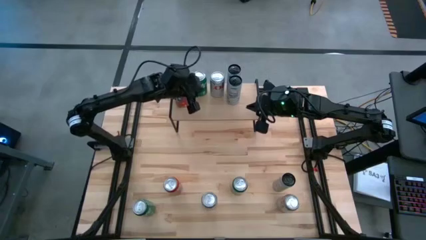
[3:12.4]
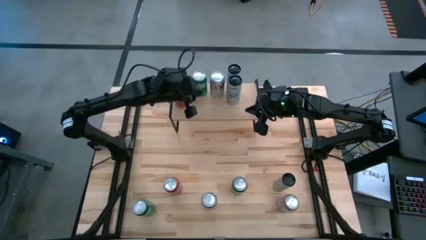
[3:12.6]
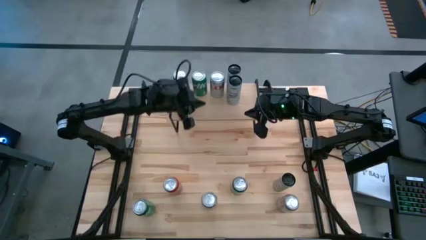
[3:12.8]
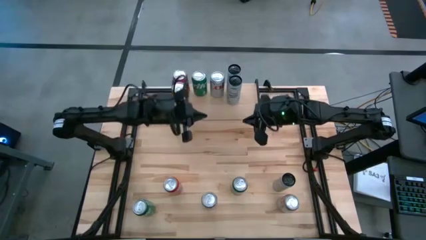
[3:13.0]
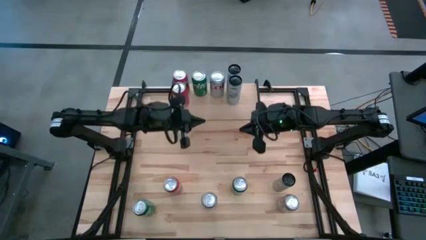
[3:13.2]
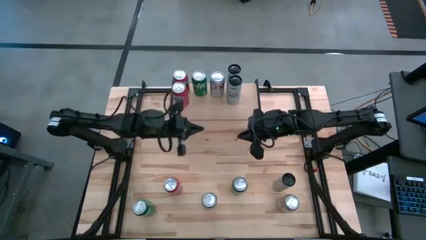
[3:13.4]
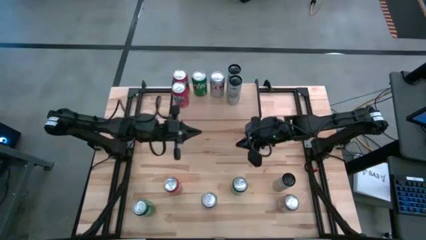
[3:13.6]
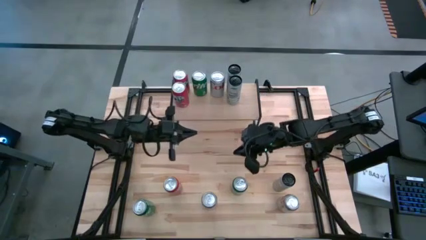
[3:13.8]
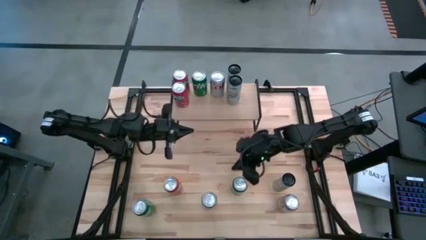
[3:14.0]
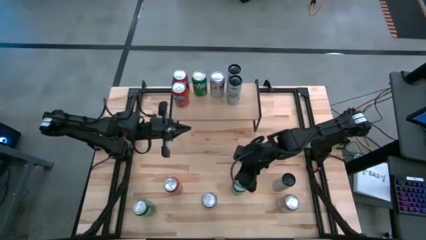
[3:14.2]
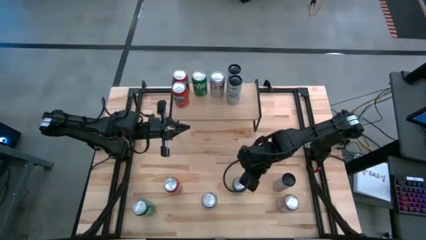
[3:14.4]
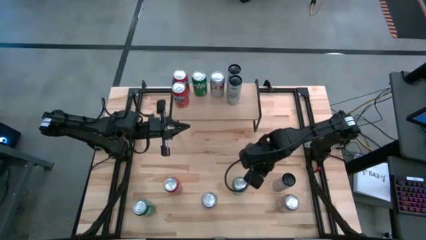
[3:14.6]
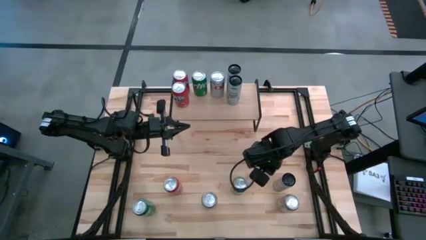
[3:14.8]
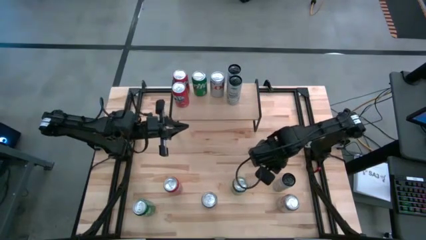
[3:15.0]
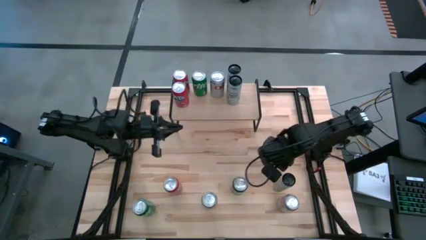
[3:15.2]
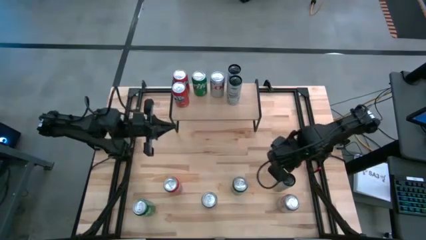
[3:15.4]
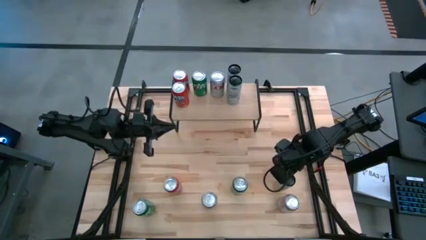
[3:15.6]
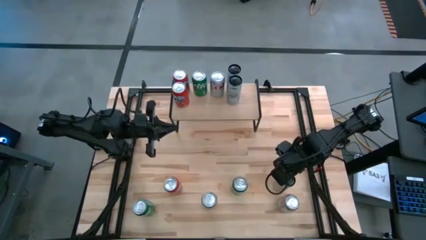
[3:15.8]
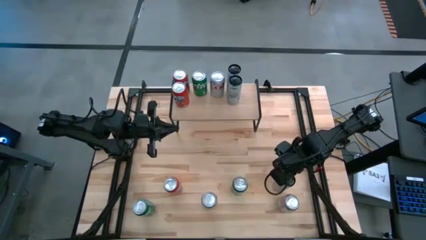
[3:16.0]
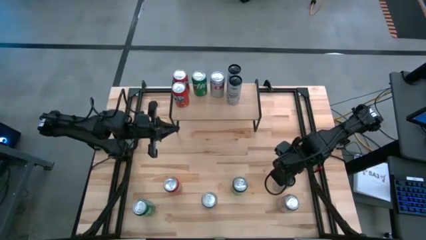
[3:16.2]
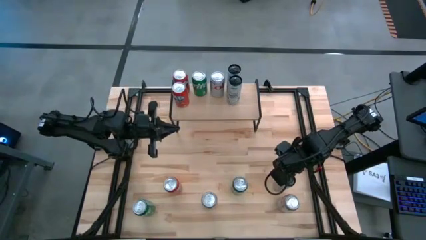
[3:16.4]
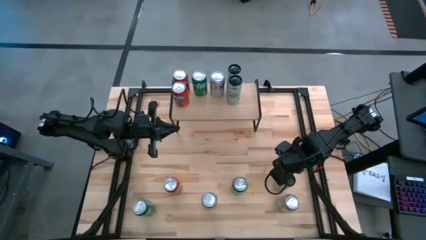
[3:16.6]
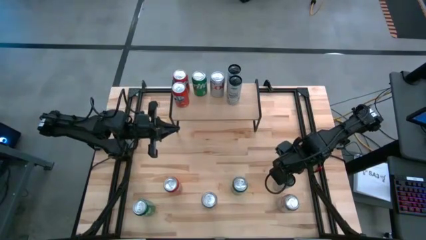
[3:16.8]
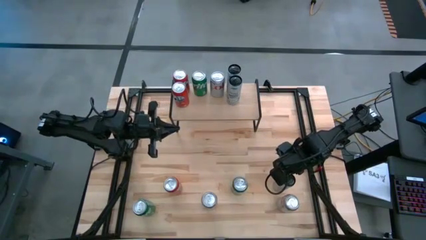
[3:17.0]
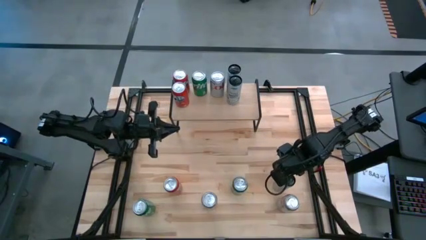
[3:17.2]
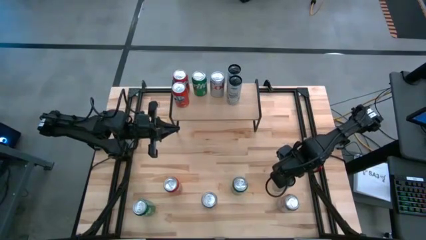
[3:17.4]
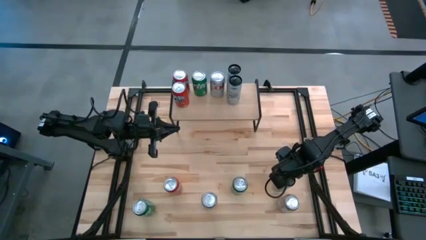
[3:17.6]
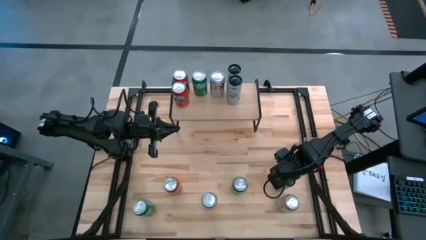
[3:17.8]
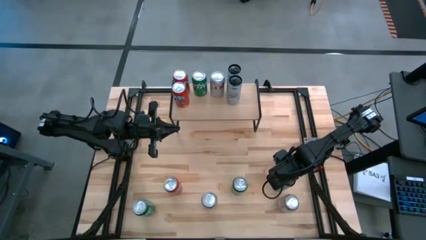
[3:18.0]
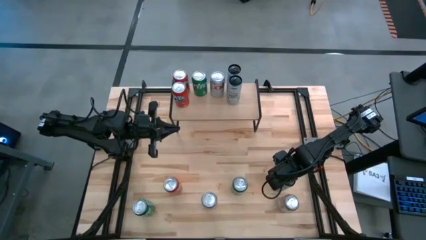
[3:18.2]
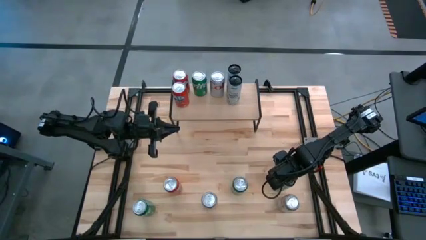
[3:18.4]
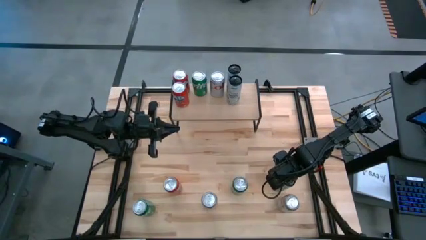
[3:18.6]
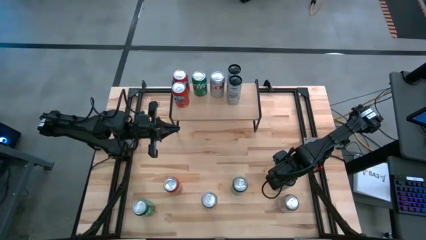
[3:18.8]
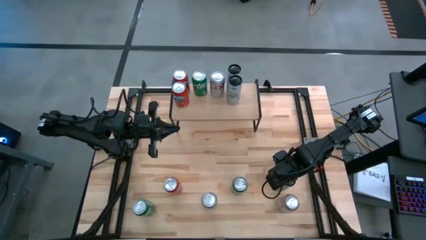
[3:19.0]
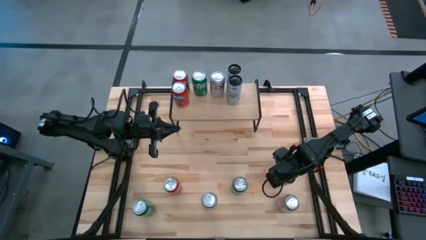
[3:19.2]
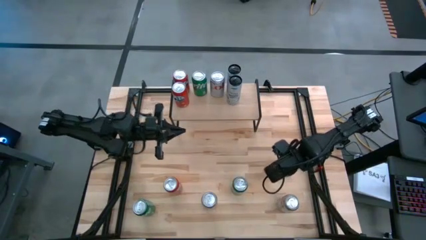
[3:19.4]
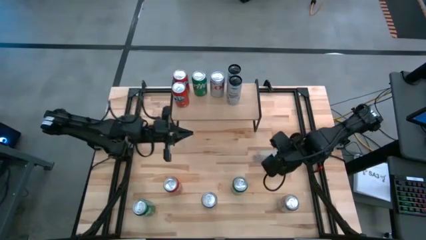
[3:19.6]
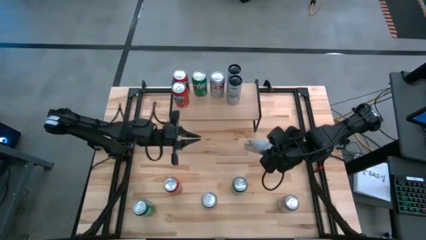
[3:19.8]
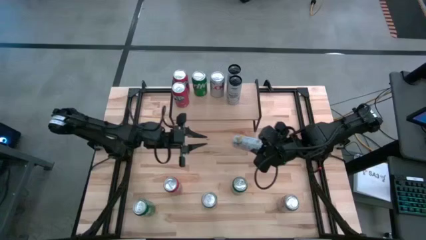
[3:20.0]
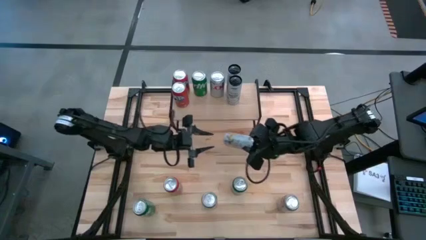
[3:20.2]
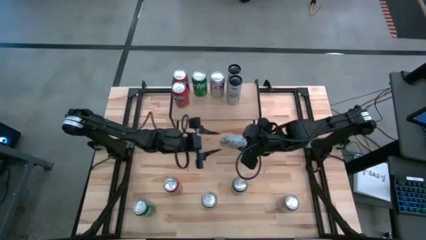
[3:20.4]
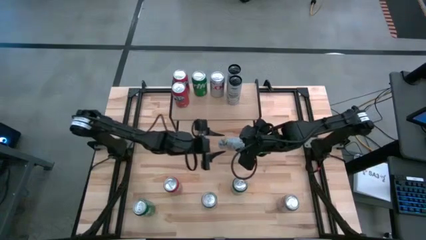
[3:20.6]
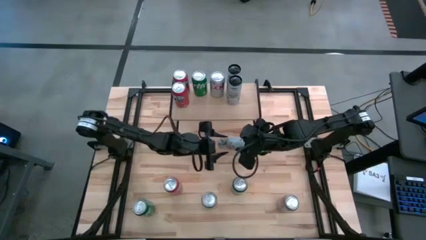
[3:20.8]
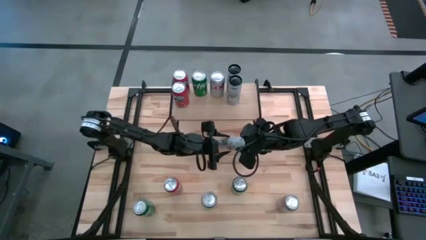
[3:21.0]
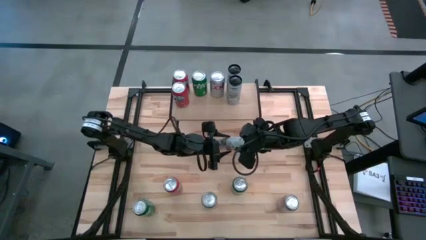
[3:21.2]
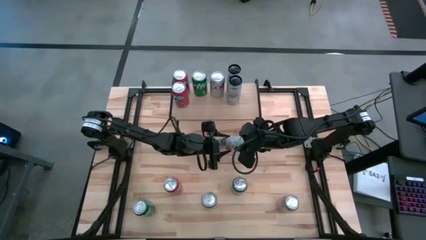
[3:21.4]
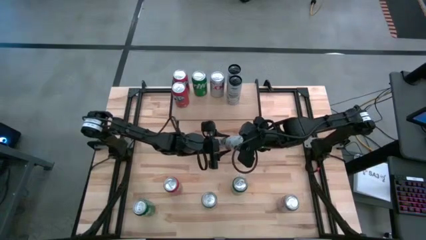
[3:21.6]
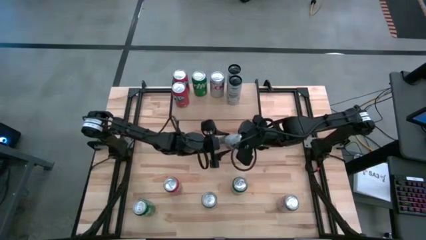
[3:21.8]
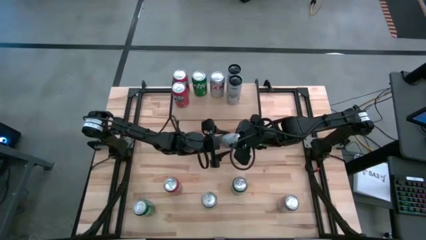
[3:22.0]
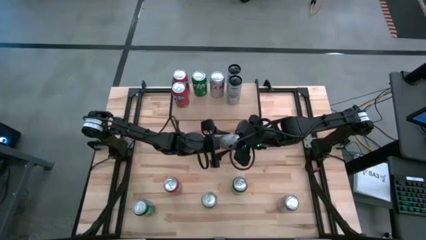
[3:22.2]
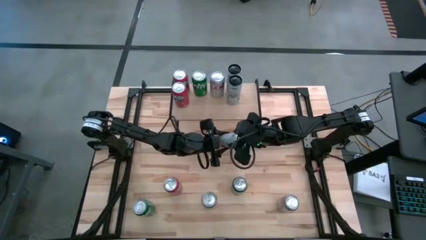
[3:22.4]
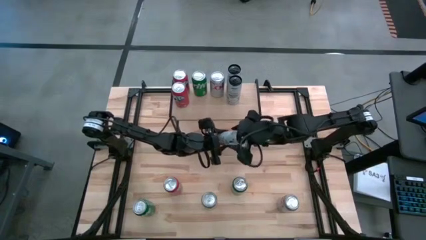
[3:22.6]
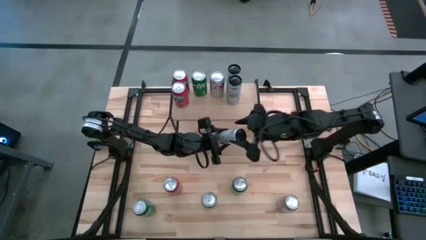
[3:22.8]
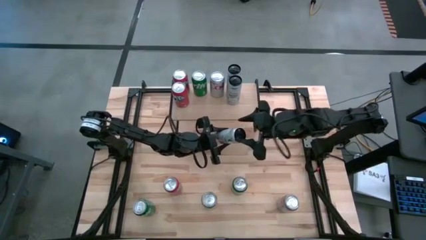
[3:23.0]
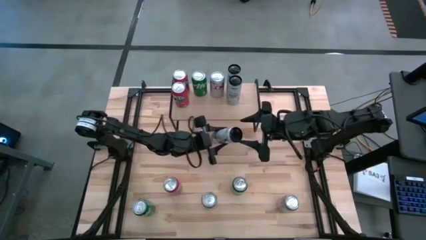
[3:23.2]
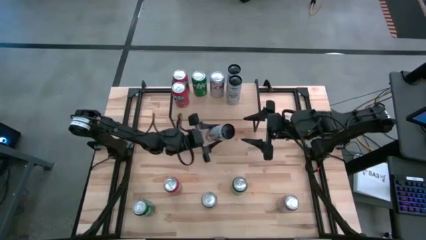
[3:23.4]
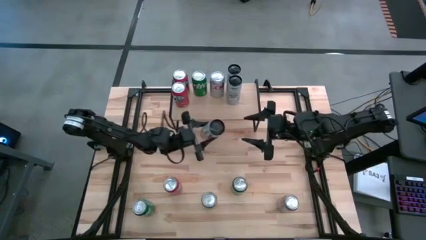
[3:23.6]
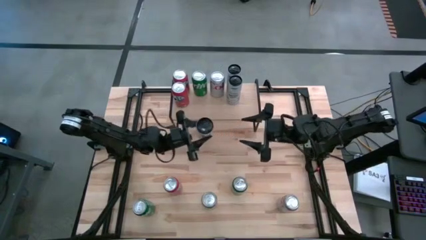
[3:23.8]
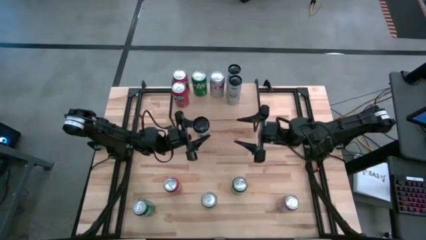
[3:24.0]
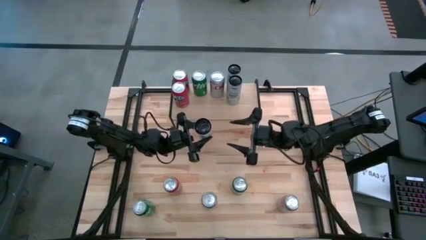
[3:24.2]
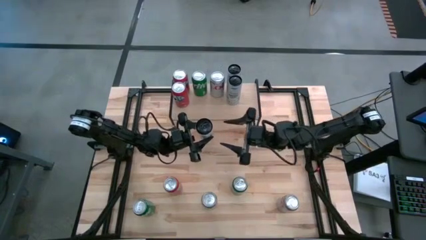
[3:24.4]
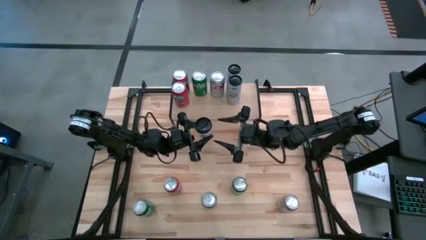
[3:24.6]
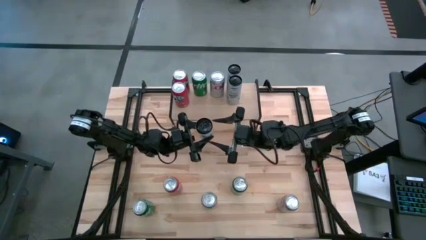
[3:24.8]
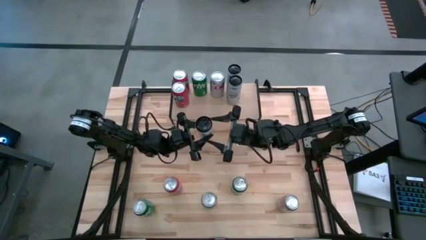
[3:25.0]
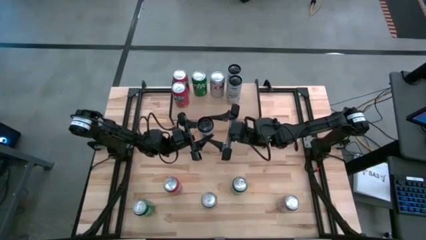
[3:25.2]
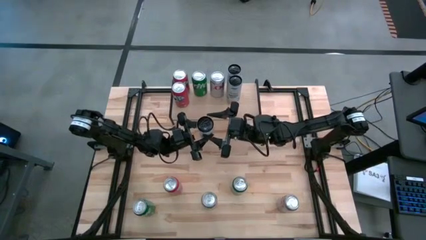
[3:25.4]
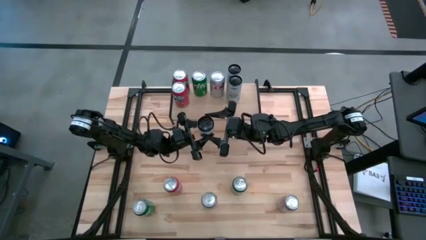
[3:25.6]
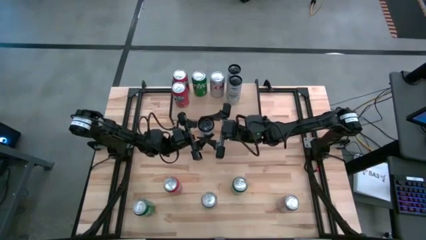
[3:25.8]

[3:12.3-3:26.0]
Task: Place canned beverage on shelf
Put the white-yellow soda can on the shelf

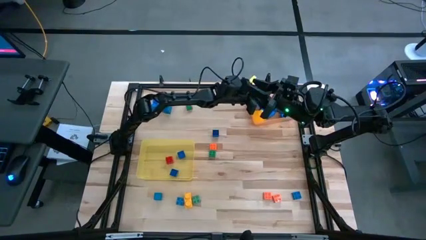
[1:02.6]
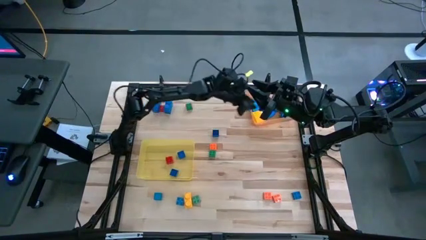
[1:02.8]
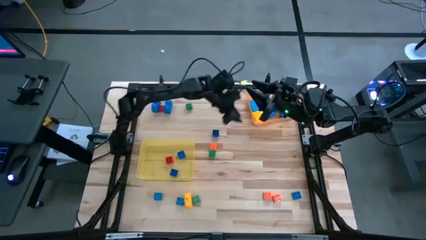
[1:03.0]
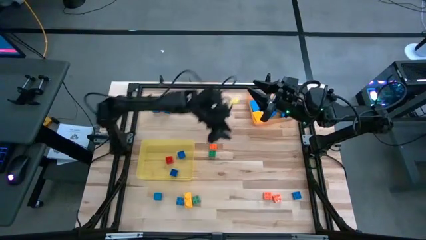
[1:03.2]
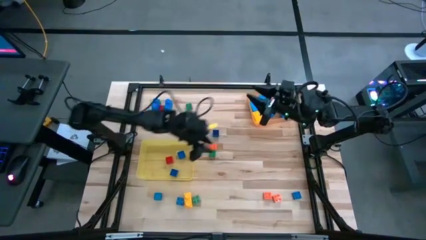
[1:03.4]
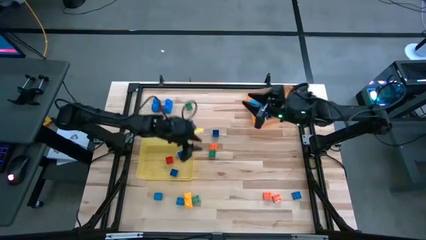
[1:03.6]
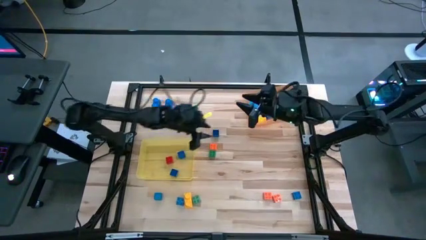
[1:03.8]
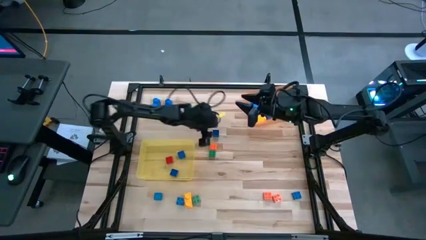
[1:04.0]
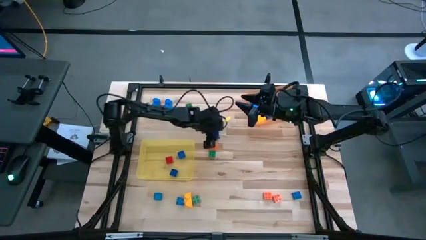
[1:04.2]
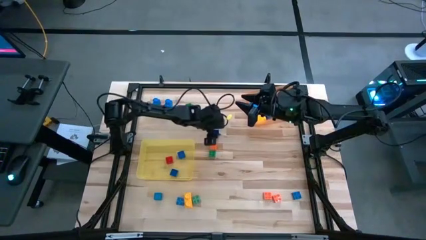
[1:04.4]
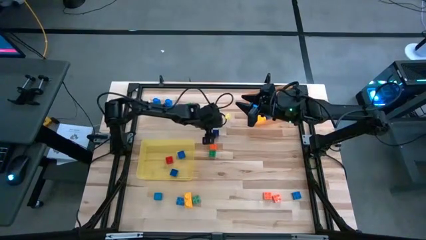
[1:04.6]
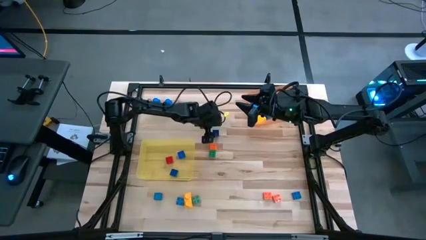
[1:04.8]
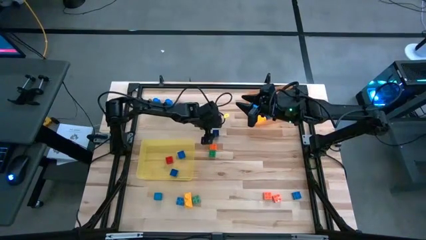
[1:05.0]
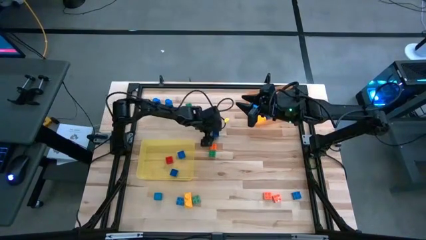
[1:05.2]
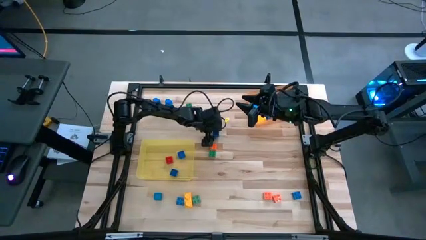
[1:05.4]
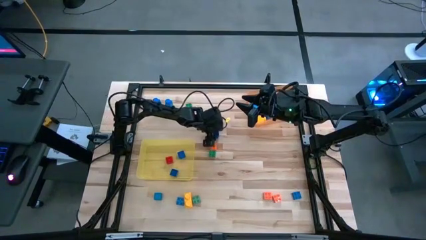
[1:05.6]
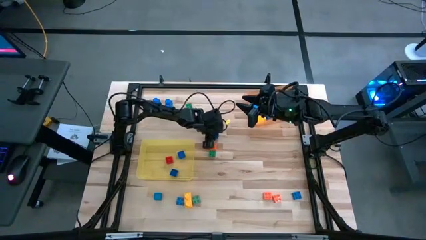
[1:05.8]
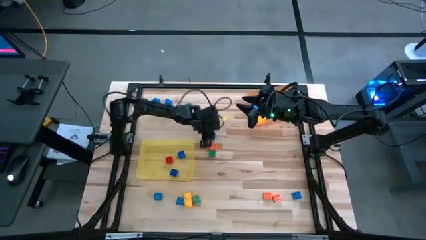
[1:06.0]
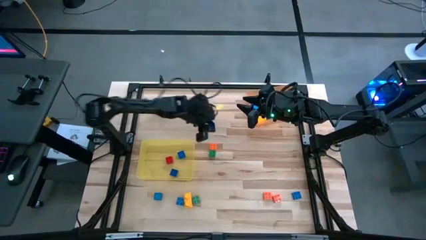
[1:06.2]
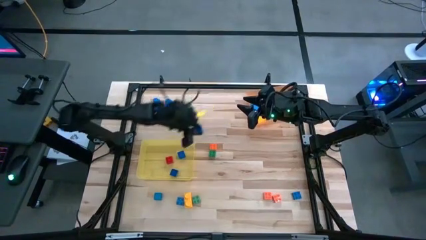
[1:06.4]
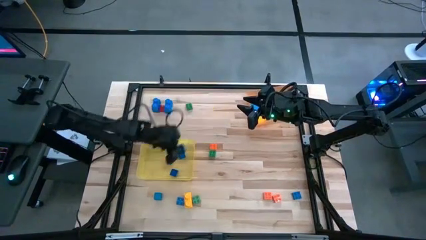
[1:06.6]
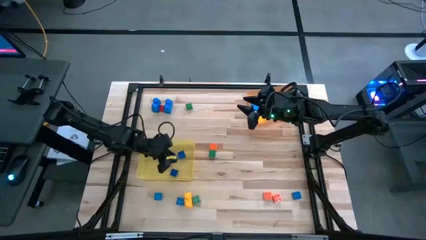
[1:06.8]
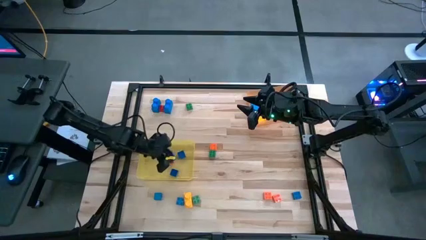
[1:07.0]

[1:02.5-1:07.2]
Task: Sort blocks by size
Put the small blue 4 stud game piece into the yellow bin
